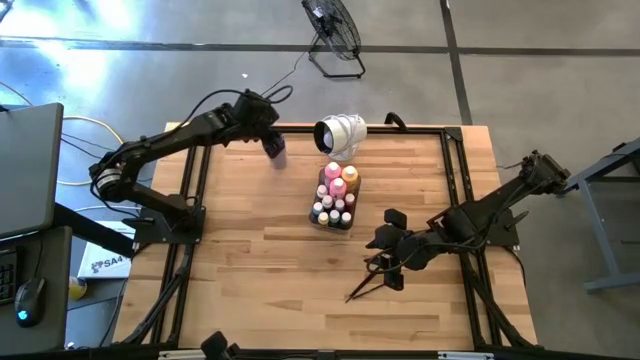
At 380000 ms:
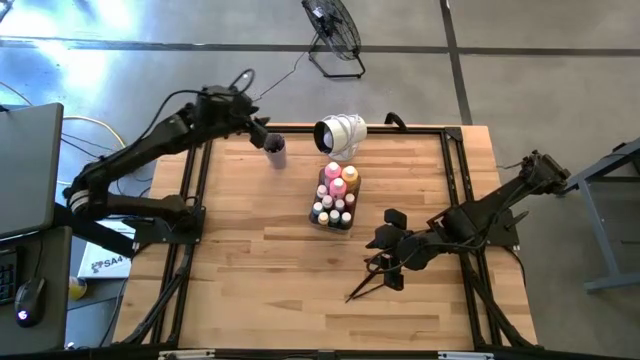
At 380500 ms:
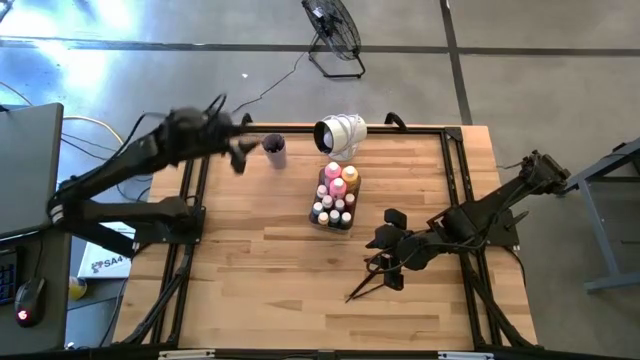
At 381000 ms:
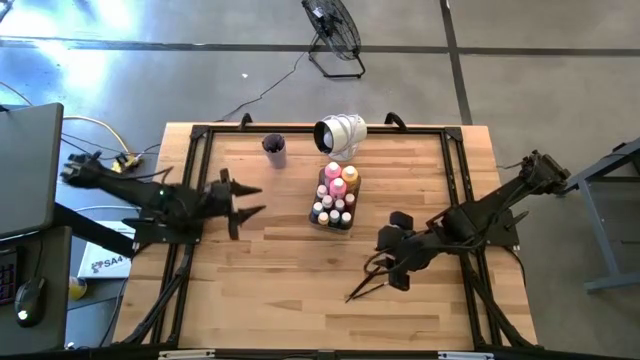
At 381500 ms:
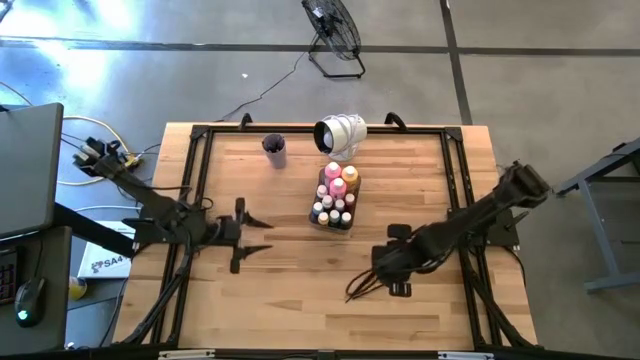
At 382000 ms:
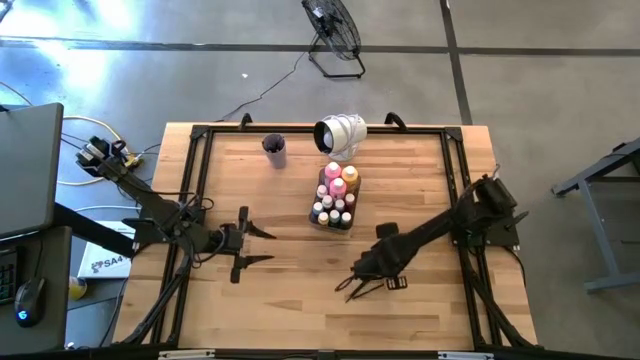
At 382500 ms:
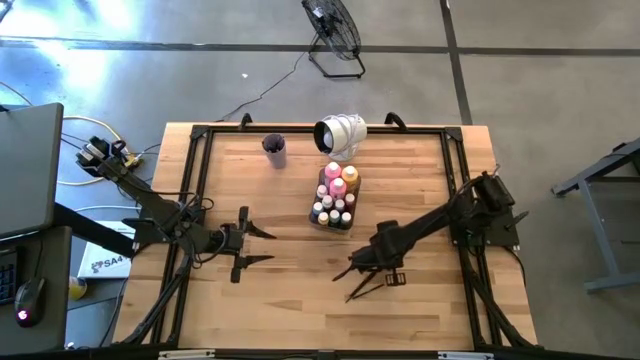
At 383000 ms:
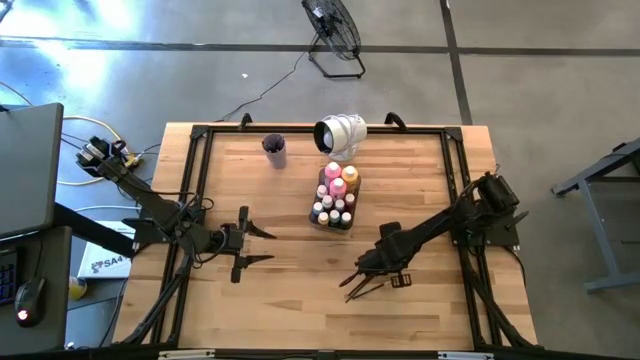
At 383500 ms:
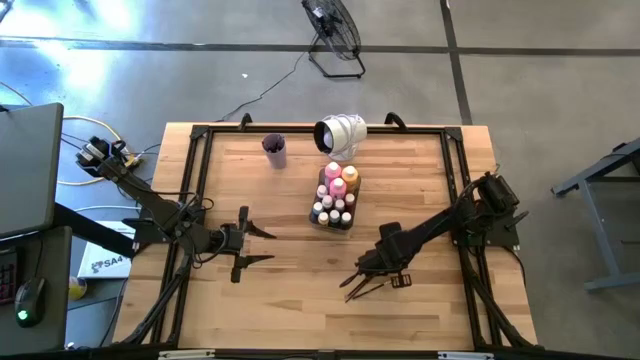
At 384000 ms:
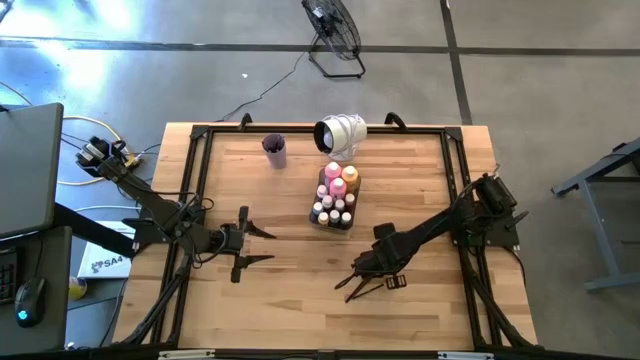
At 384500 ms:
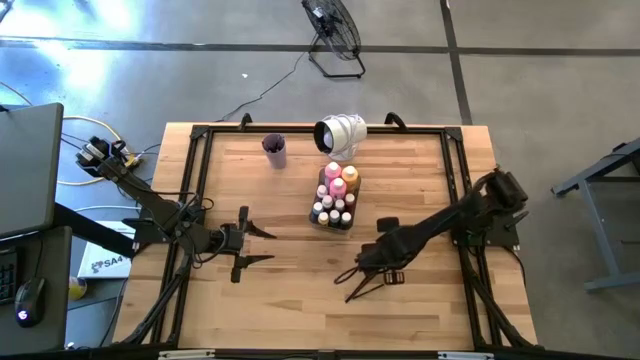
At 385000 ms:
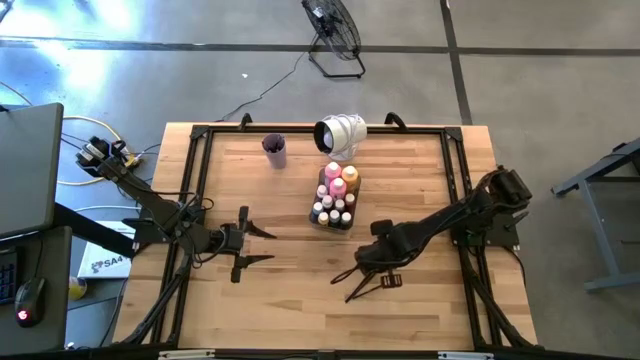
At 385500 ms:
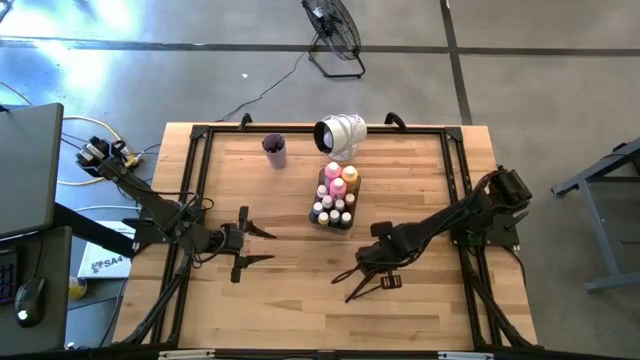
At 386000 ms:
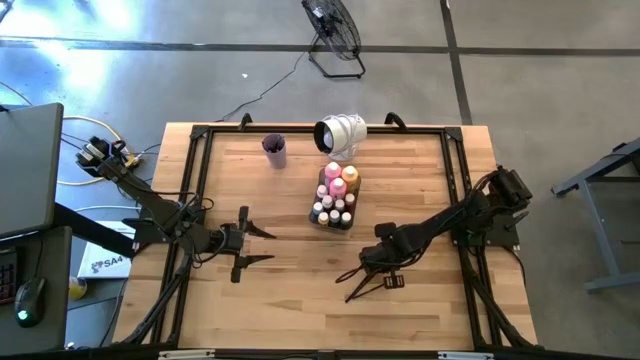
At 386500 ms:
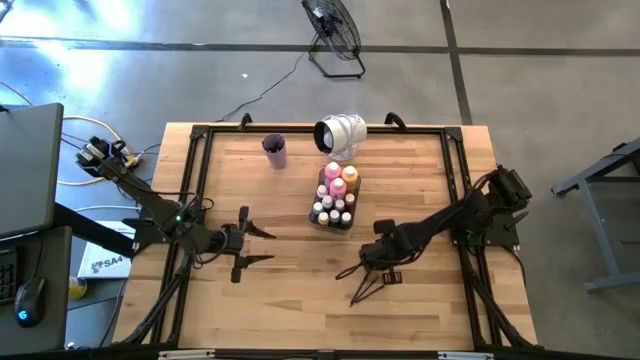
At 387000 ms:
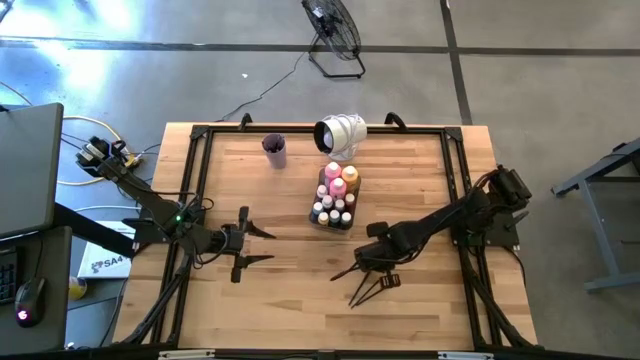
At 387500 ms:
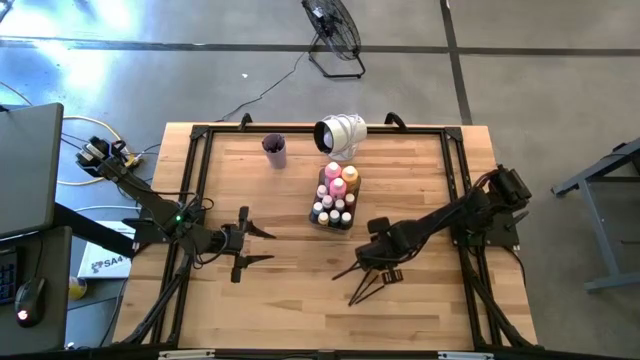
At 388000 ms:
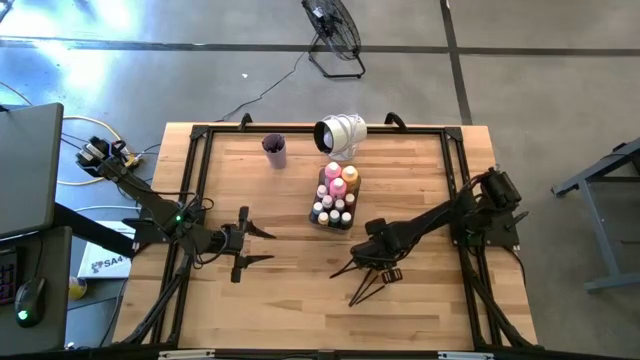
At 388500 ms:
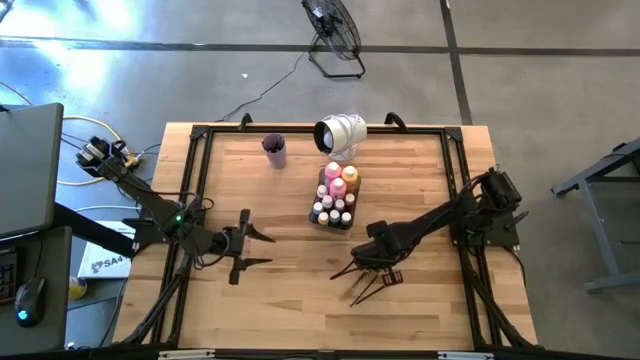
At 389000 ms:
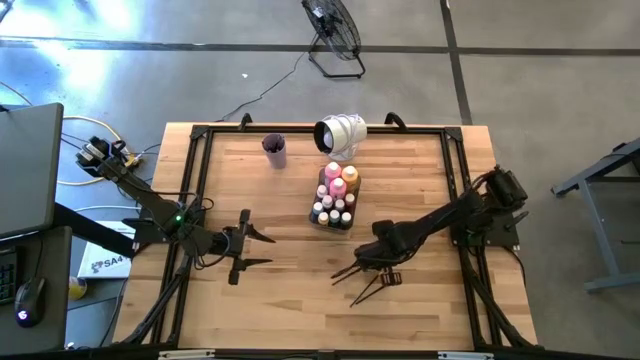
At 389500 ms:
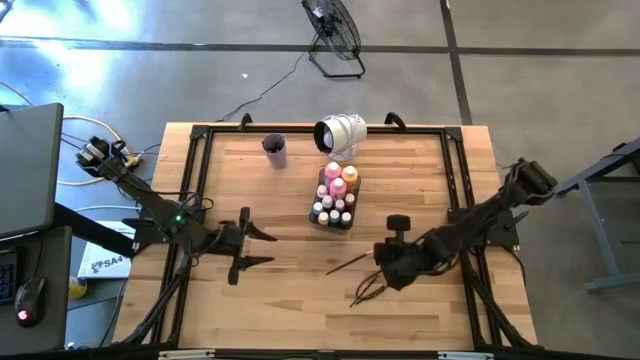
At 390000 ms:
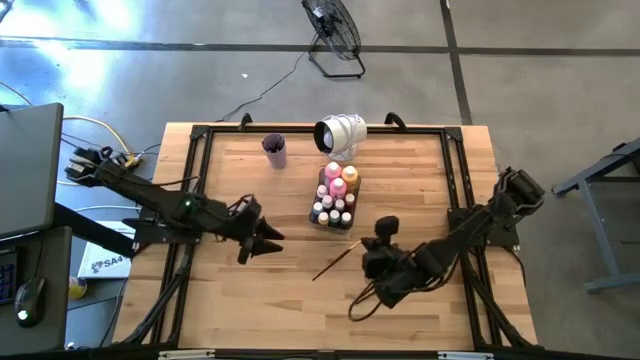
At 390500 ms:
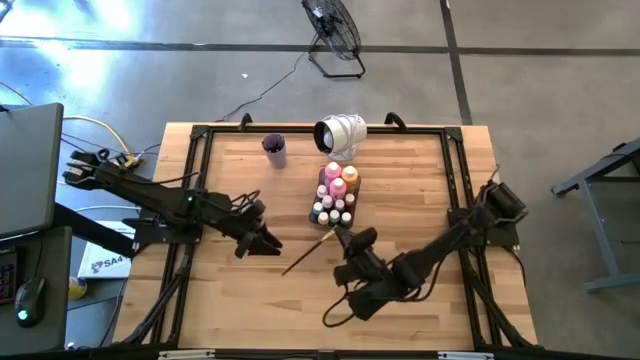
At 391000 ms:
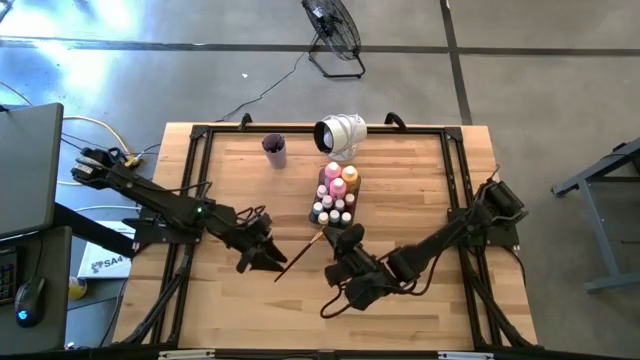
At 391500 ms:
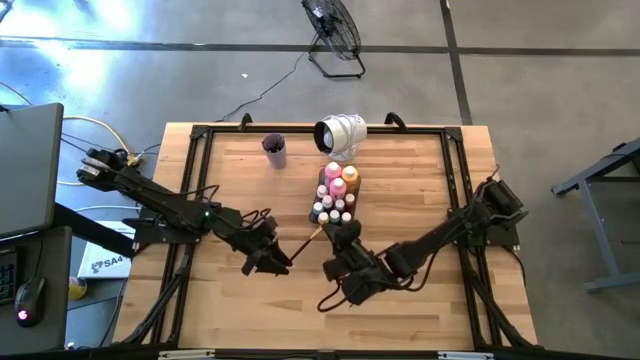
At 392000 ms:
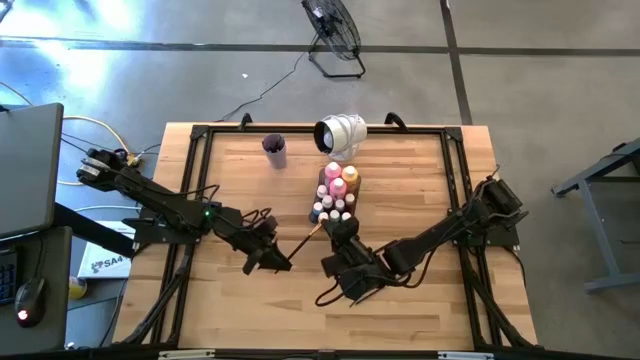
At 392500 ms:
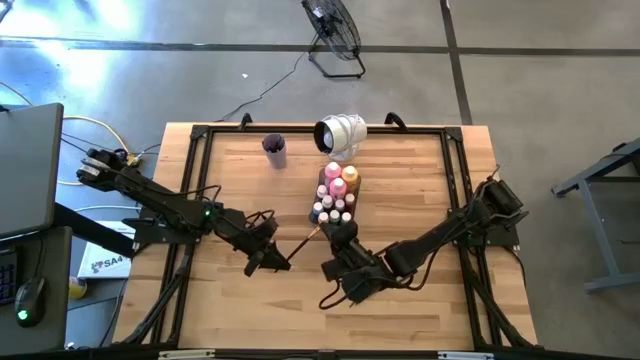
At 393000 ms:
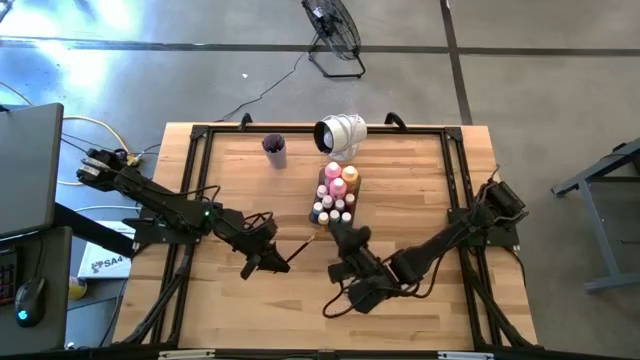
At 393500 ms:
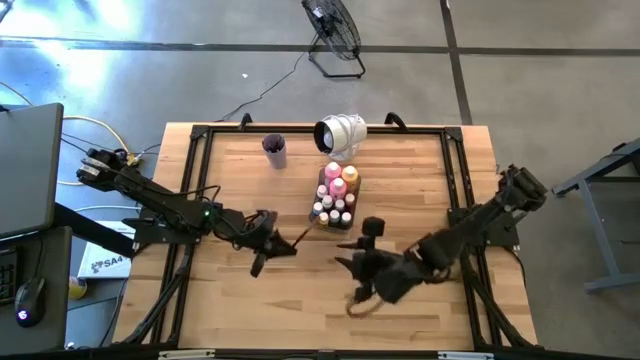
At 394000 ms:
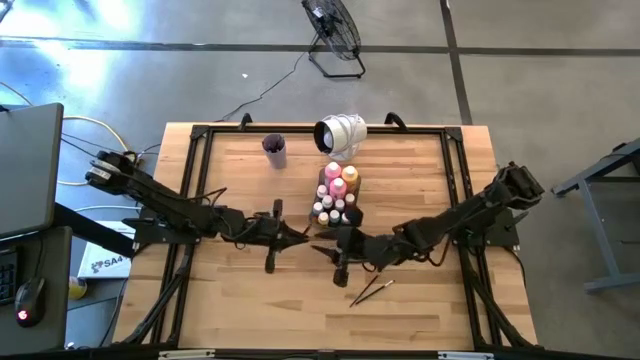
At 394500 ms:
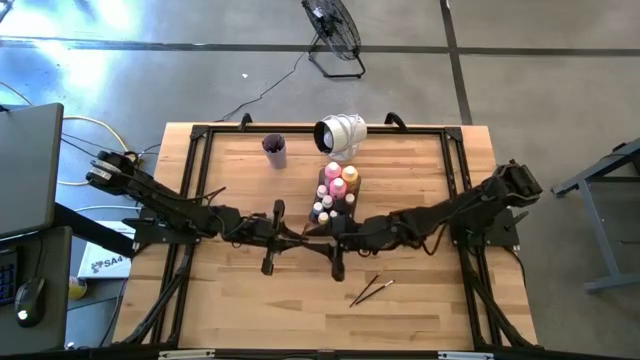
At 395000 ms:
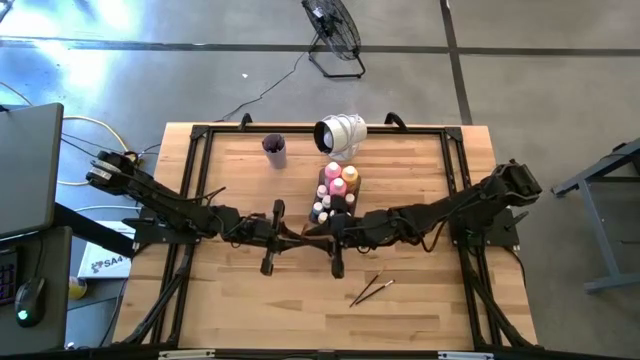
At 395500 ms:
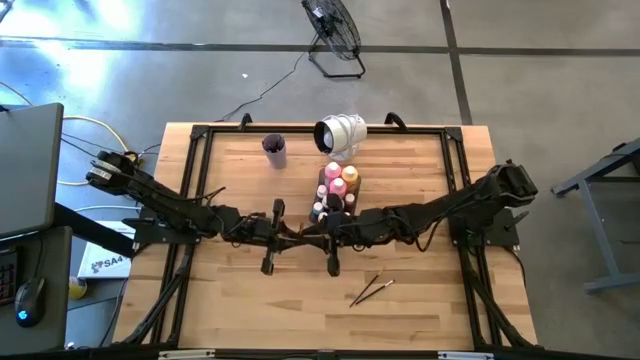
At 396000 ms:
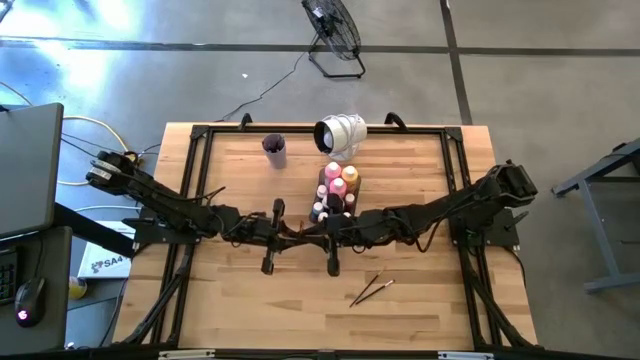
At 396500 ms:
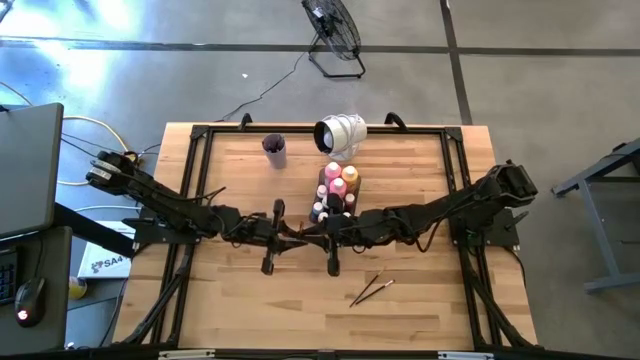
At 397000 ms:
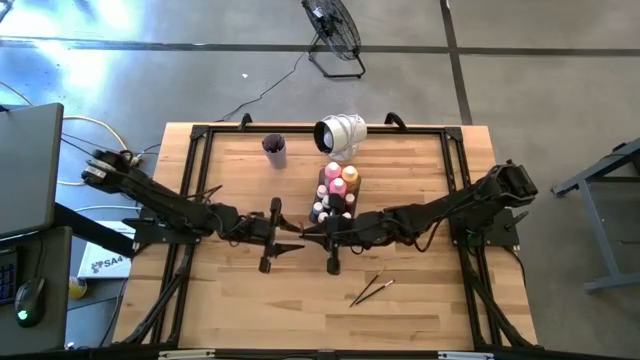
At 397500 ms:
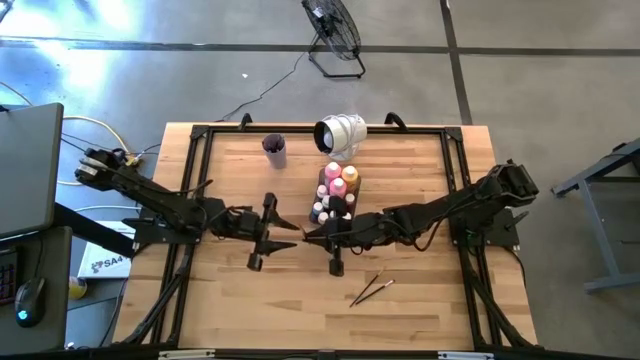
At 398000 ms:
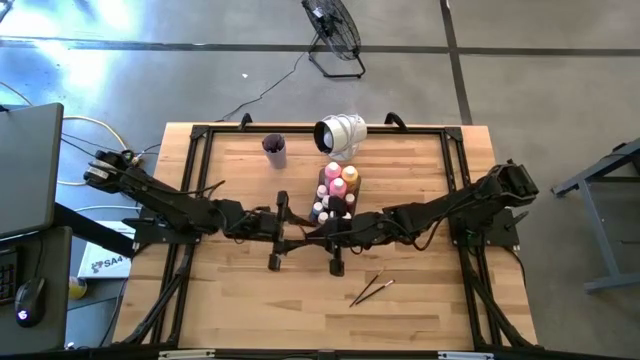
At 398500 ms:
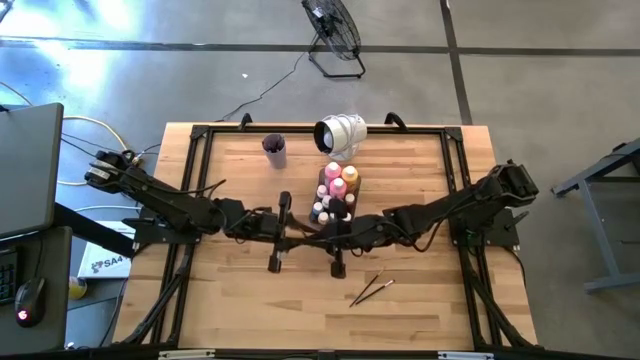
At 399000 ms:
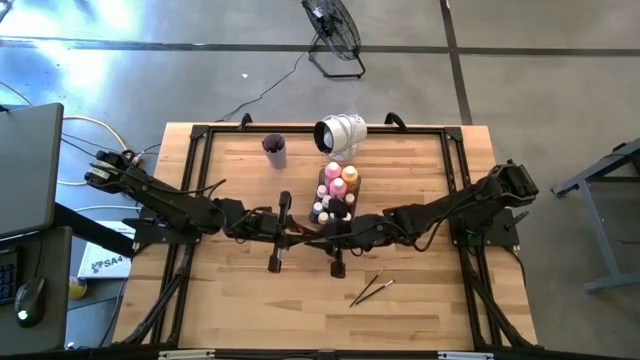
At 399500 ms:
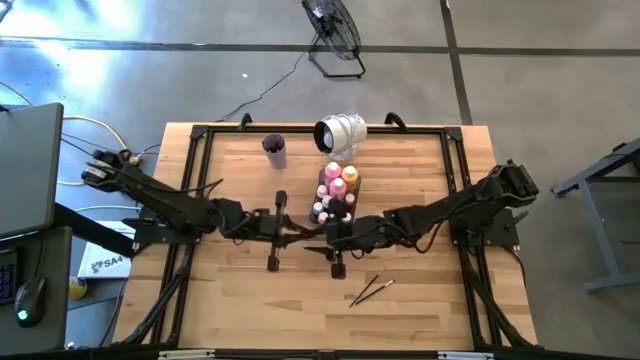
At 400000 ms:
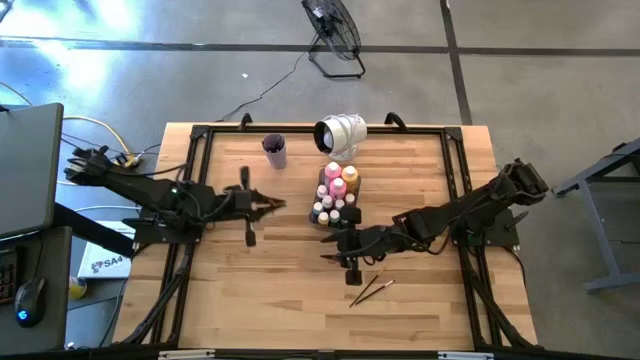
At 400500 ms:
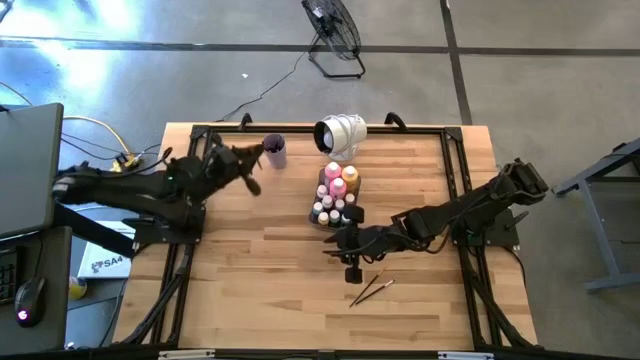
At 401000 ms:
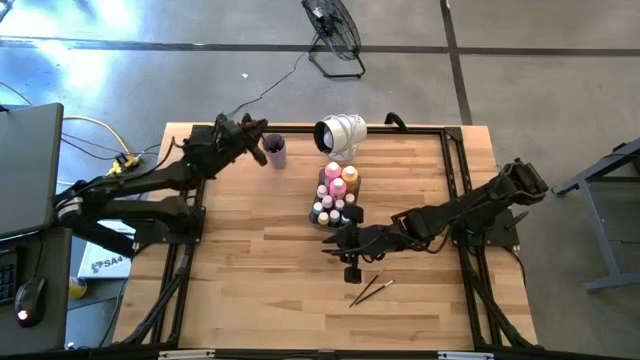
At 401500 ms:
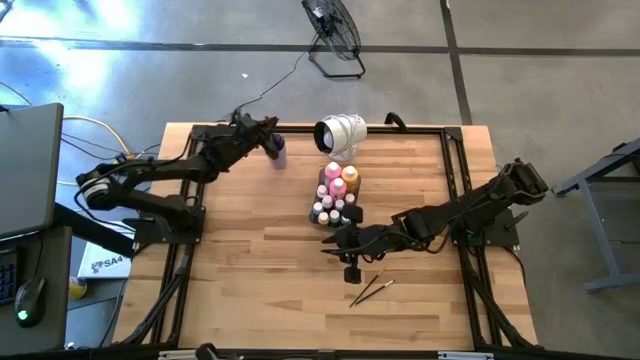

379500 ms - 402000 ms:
Task: Pick & Place Paint Supplies
Put the gold paint brush into the violet cup
